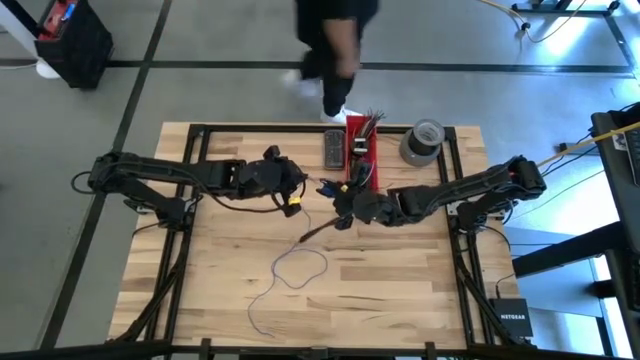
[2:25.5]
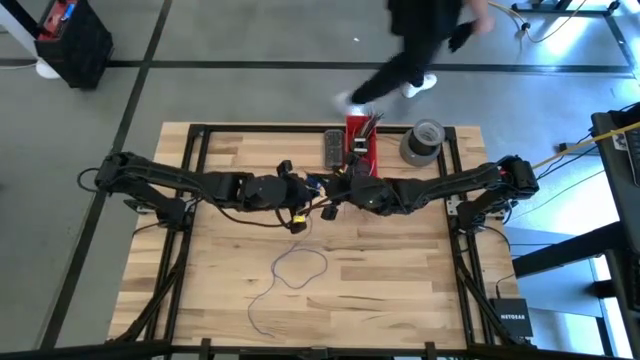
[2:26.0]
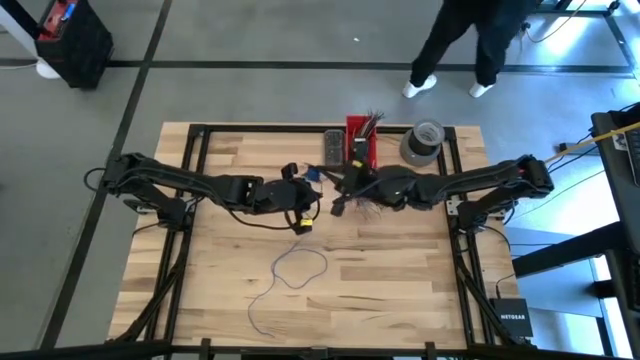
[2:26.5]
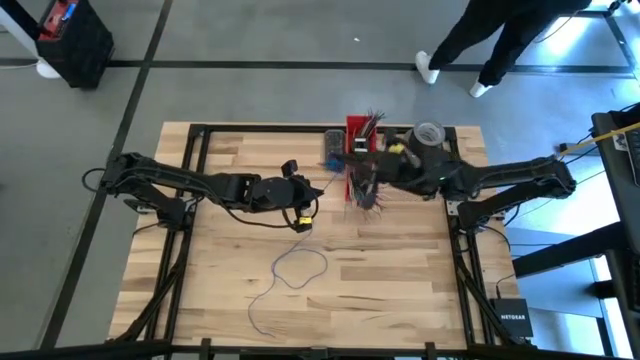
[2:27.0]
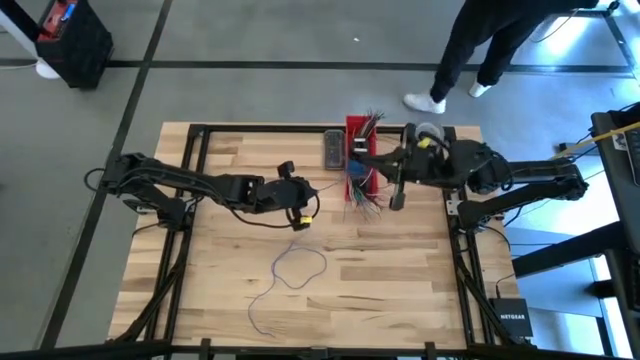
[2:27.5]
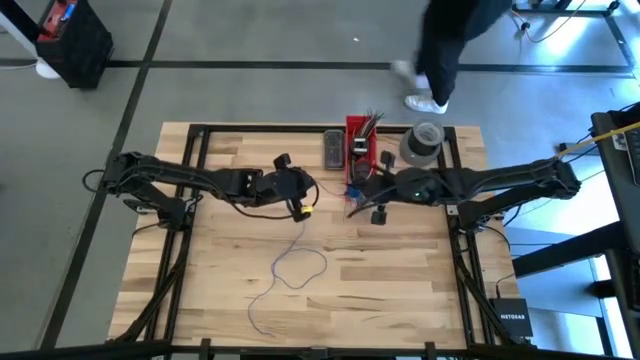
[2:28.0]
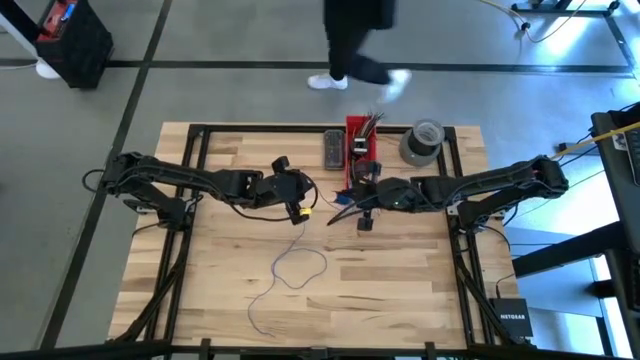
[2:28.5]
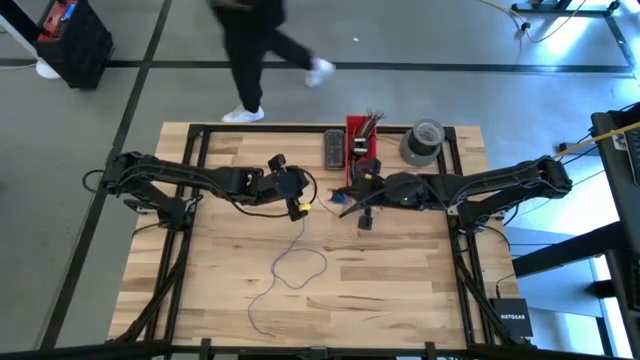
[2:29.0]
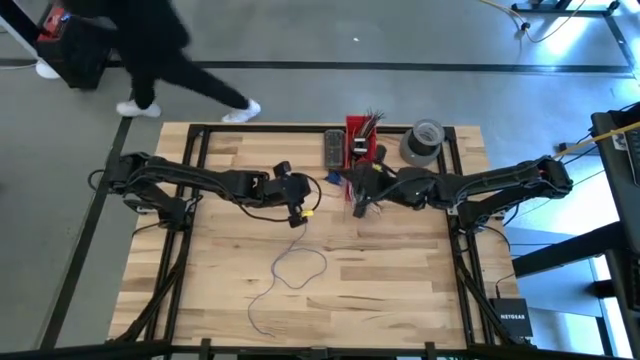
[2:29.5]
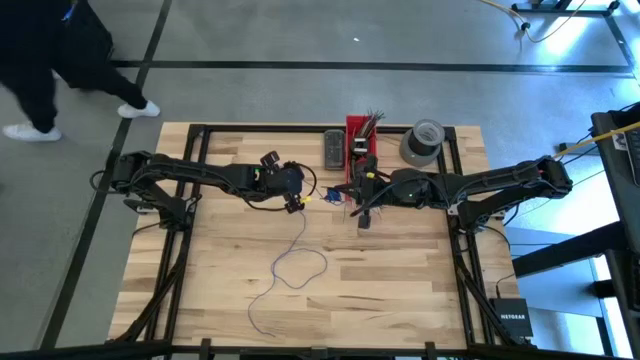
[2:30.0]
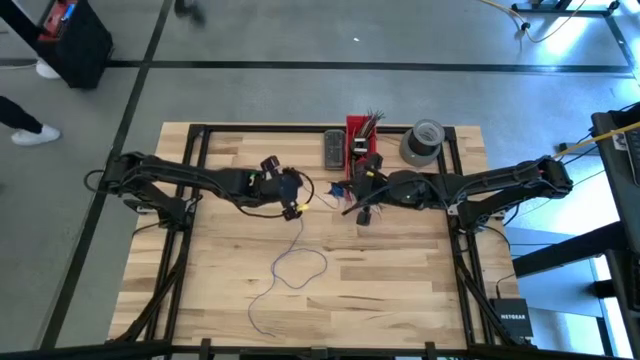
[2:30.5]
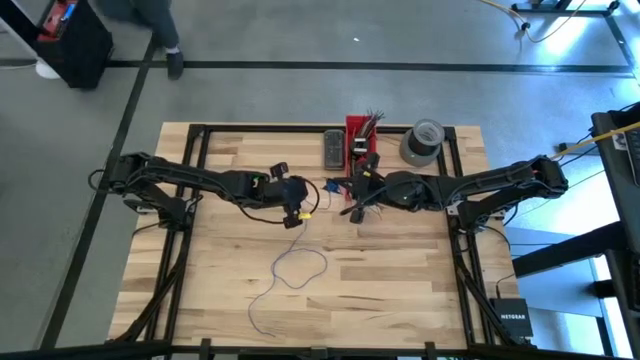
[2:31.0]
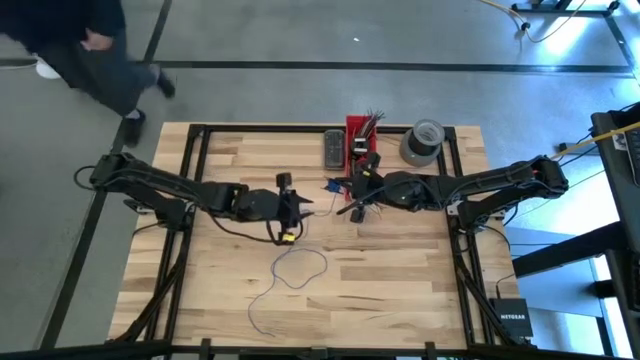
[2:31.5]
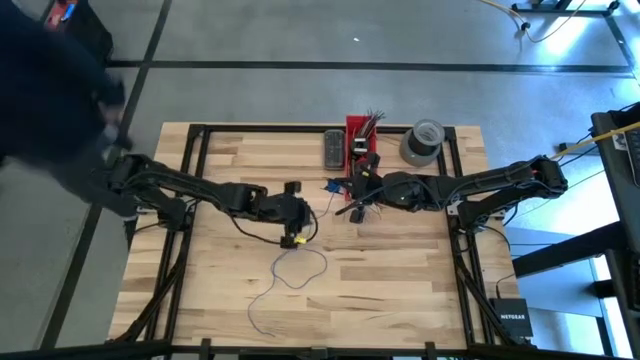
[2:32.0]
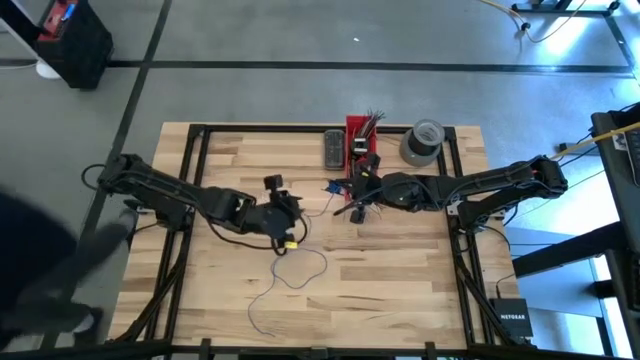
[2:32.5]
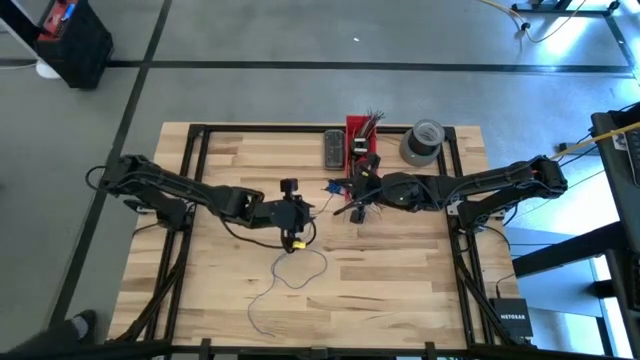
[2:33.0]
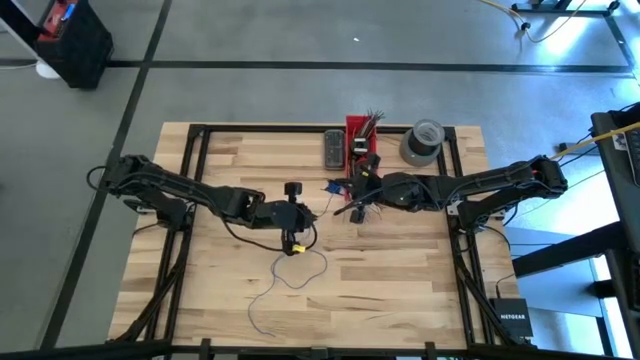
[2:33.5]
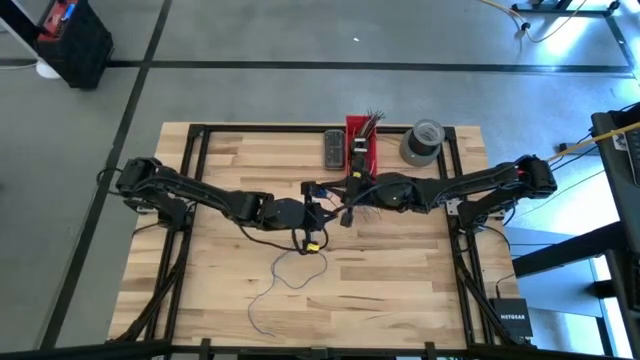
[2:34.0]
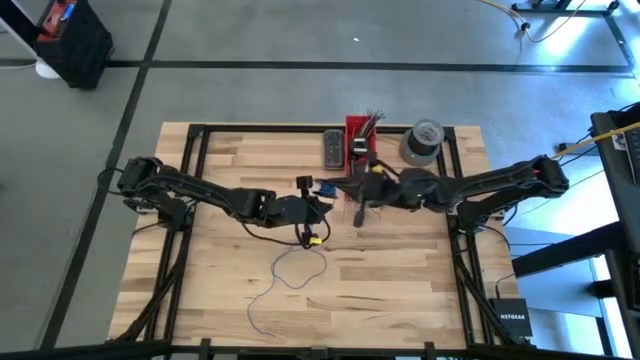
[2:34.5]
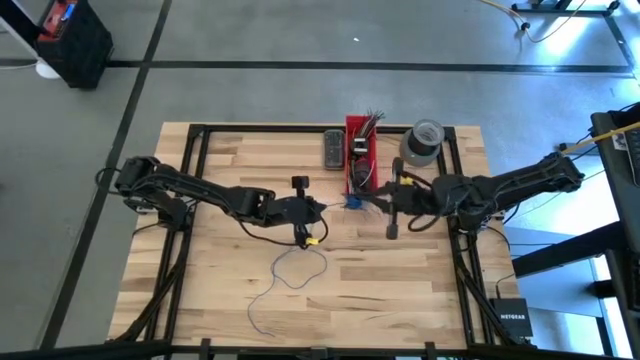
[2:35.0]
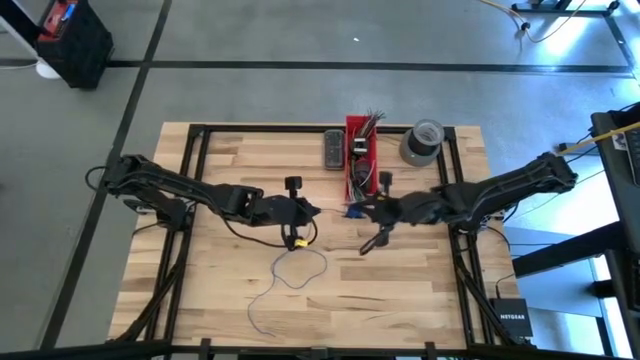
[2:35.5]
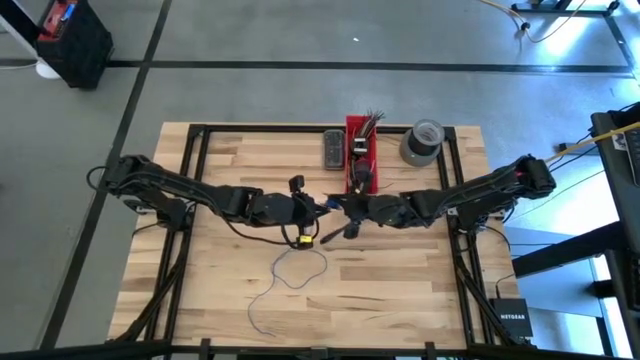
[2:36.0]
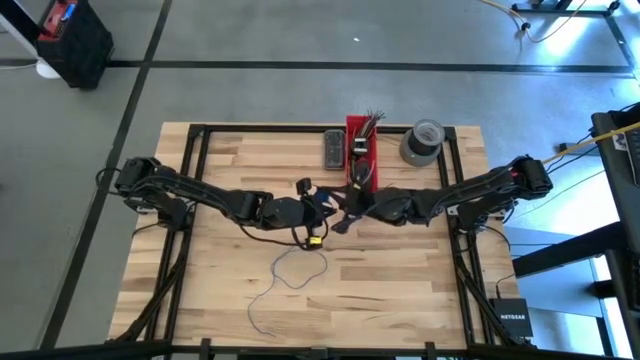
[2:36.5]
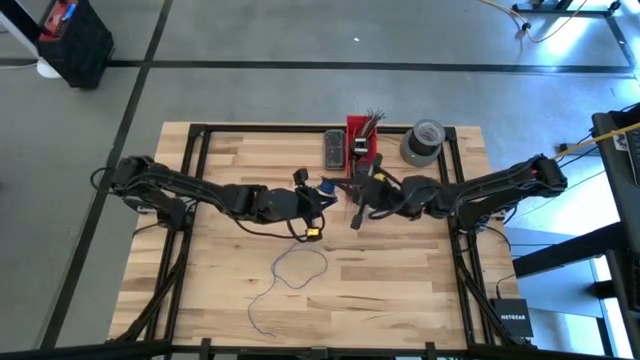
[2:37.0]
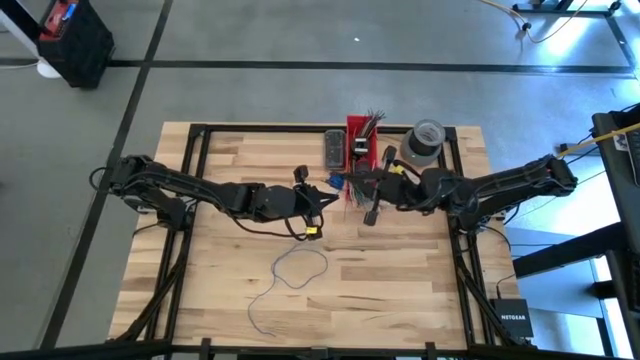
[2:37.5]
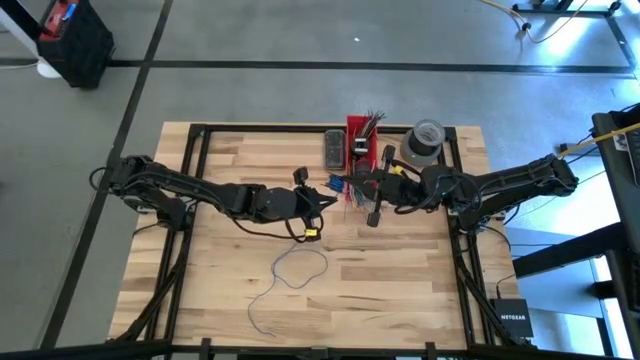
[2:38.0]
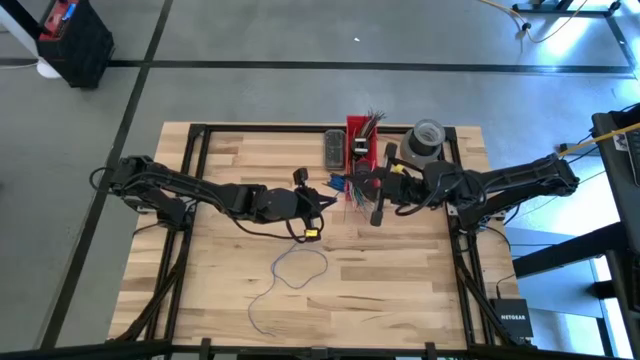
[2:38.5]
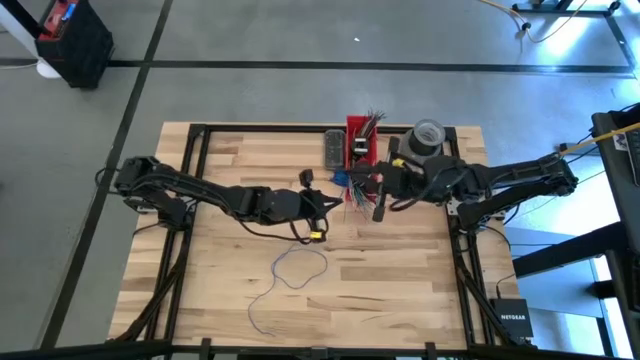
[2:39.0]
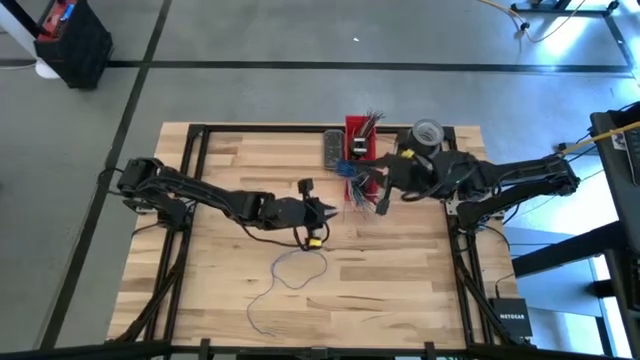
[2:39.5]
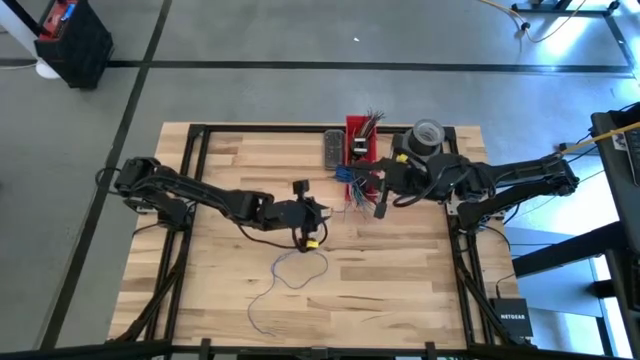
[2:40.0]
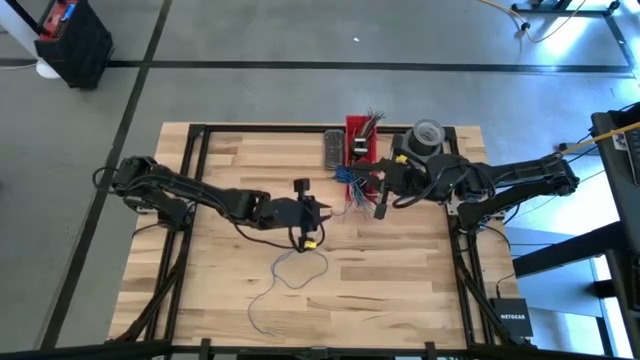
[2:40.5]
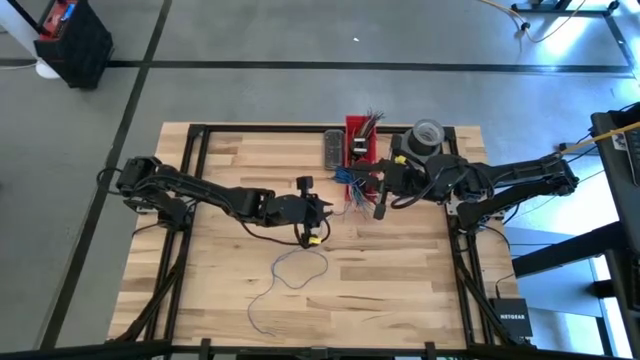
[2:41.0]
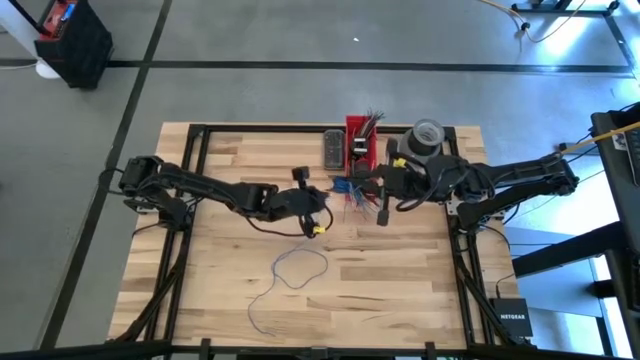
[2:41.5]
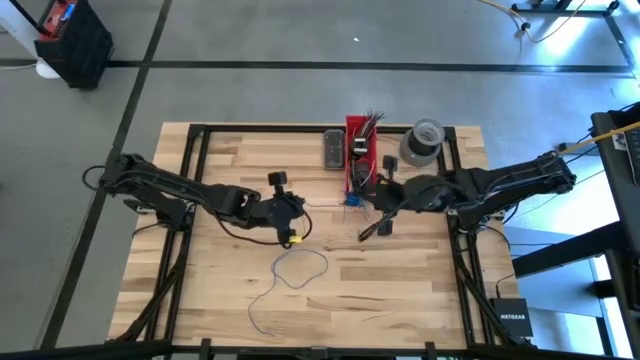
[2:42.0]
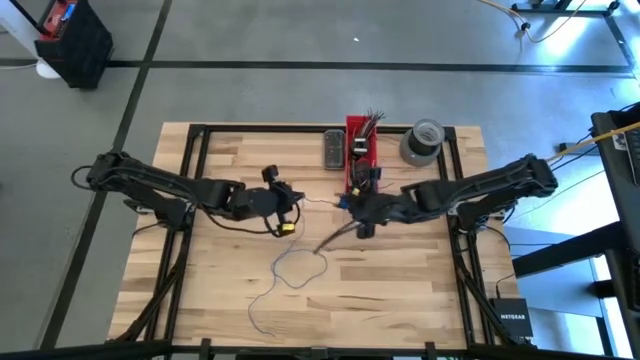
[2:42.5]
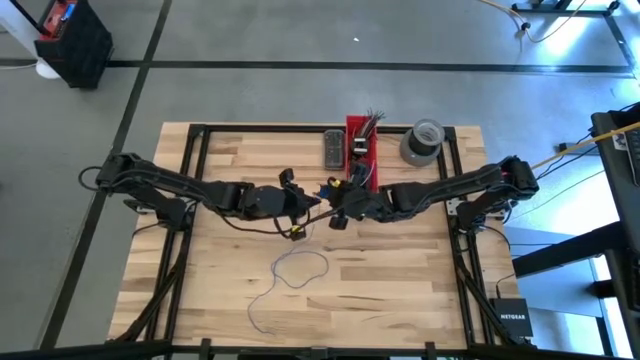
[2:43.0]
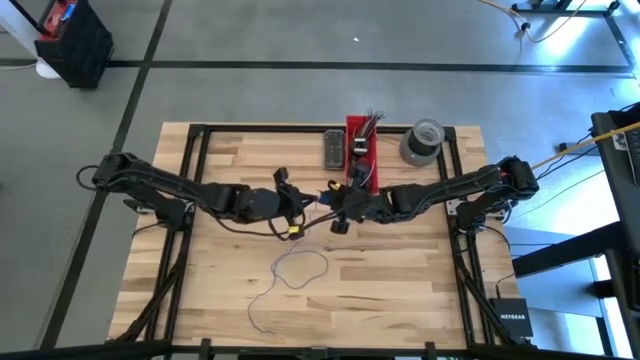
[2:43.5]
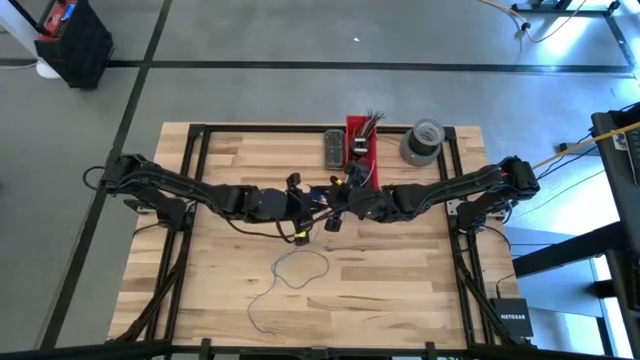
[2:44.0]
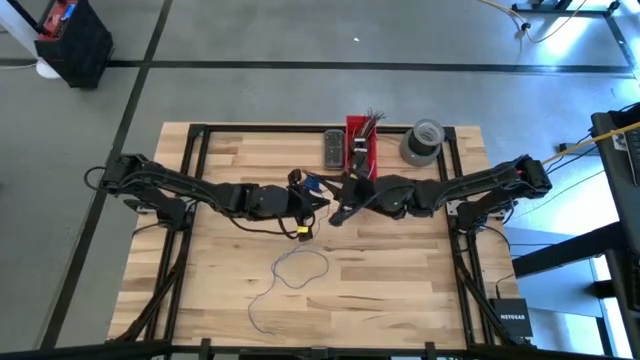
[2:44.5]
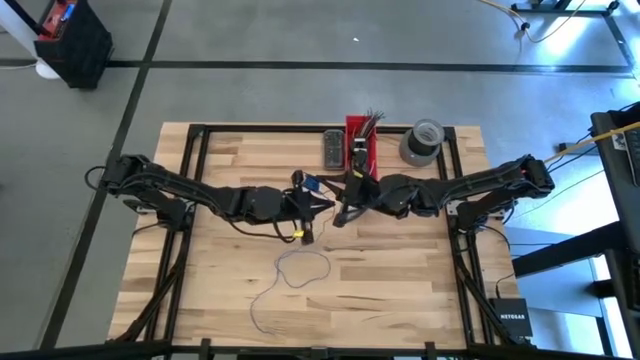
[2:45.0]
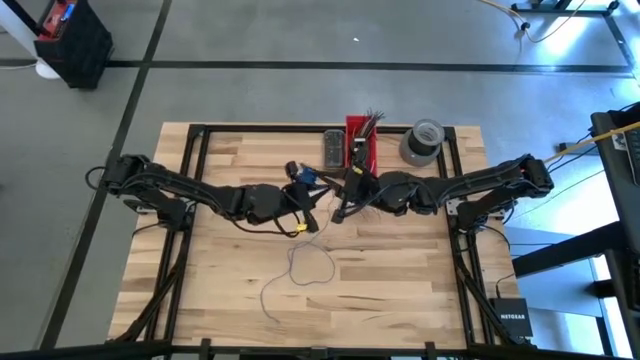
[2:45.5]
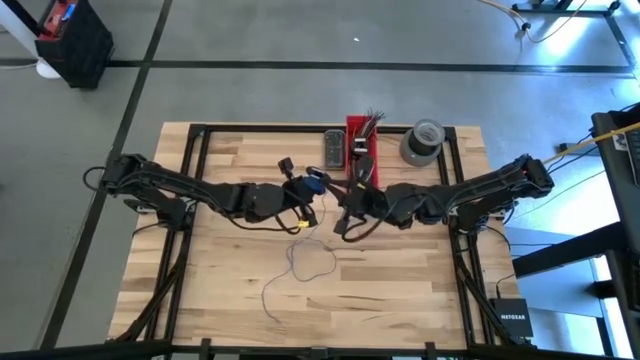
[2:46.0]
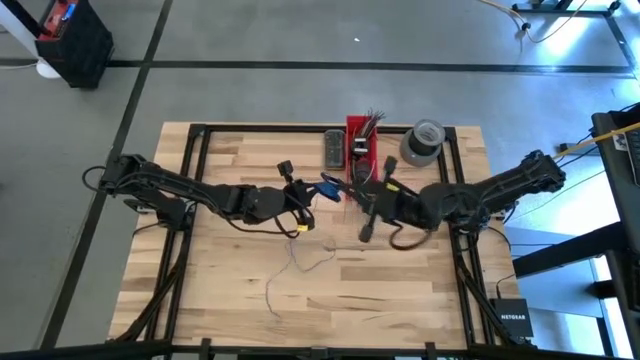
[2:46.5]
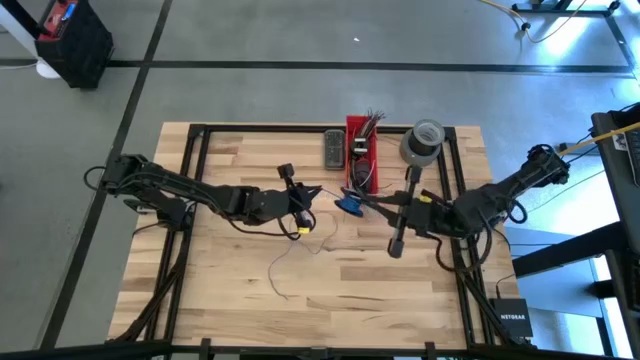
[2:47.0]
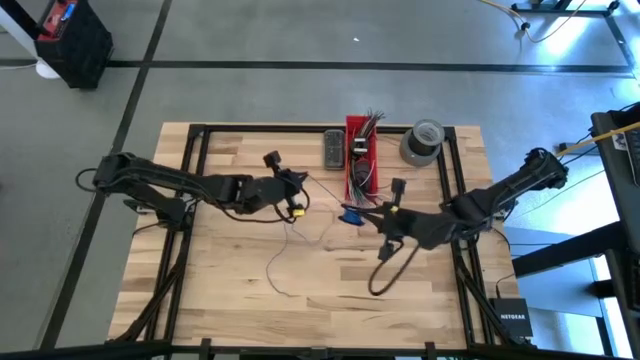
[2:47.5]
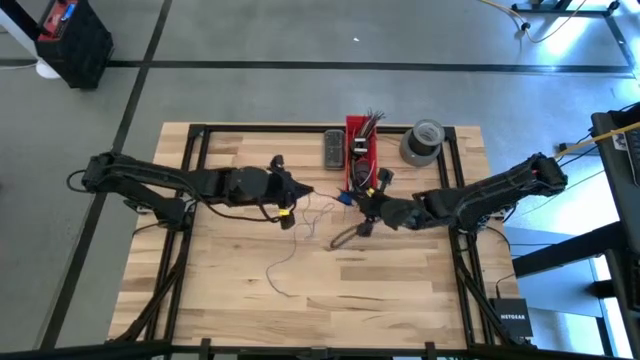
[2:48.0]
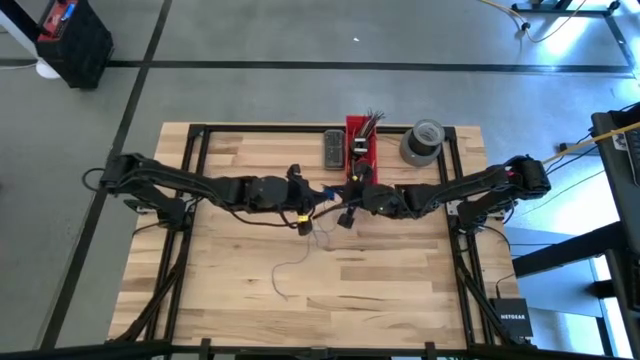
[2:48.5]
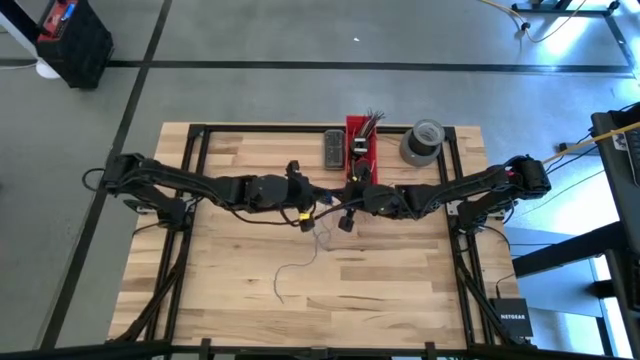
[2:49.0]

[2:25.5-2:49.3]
Task: Coil cords
Coil the blue wire into the black spool
